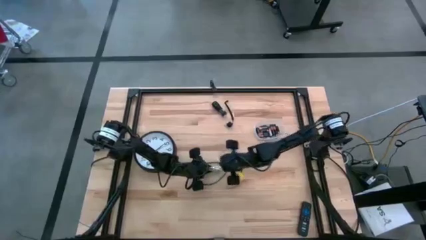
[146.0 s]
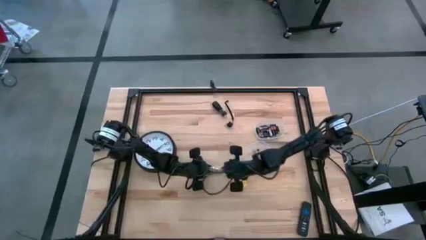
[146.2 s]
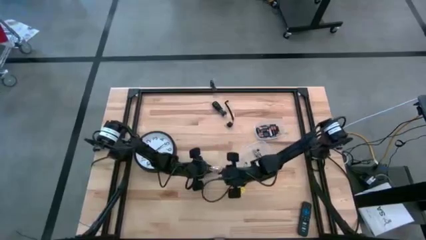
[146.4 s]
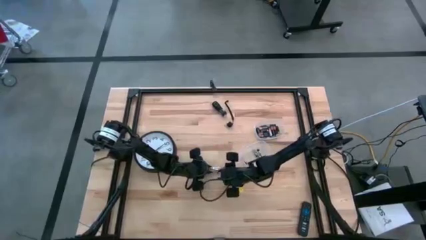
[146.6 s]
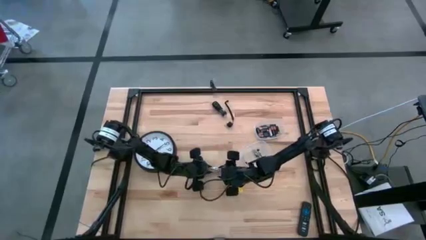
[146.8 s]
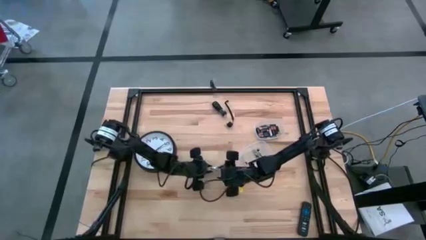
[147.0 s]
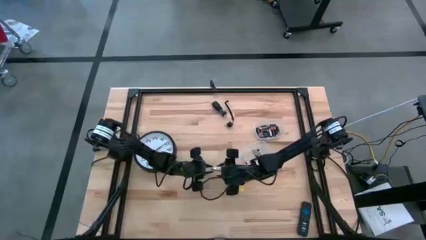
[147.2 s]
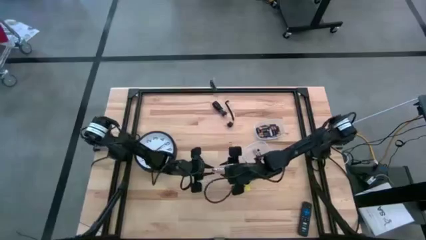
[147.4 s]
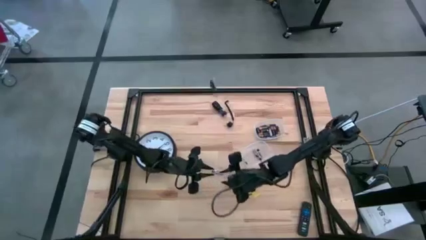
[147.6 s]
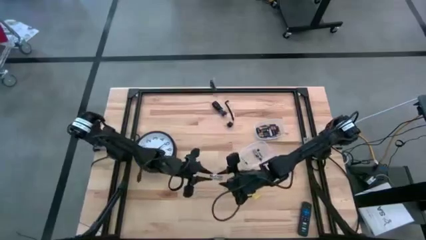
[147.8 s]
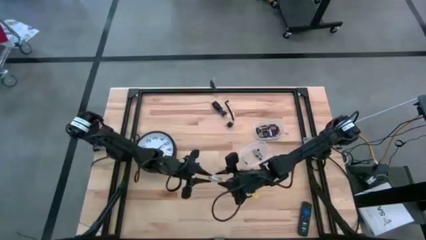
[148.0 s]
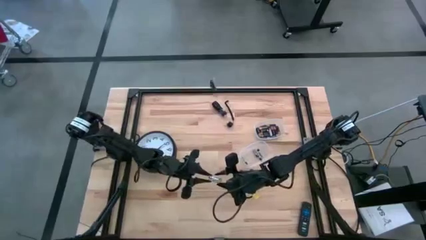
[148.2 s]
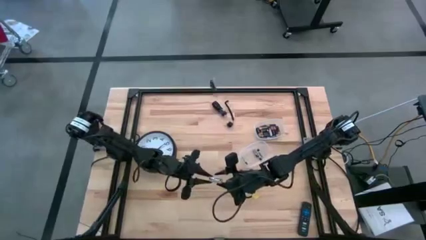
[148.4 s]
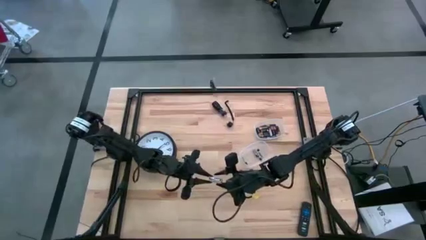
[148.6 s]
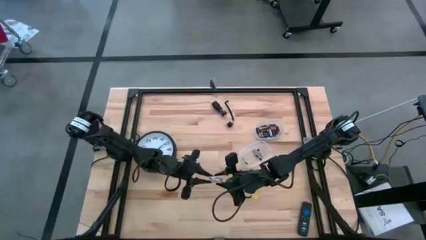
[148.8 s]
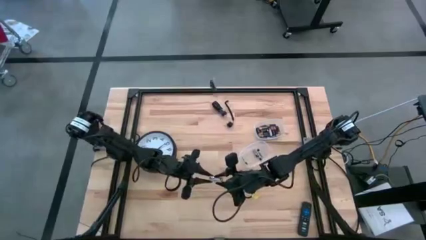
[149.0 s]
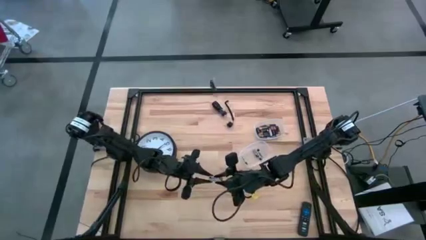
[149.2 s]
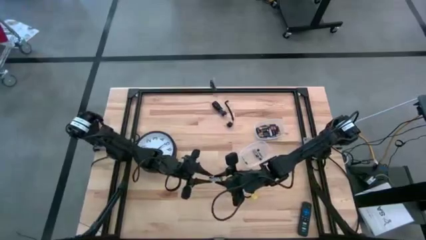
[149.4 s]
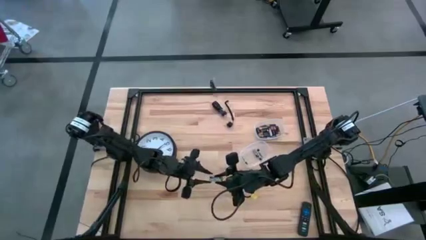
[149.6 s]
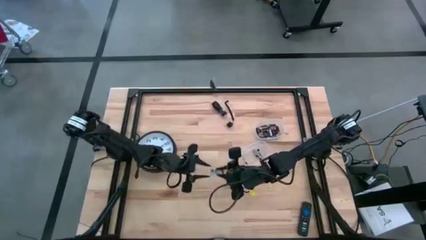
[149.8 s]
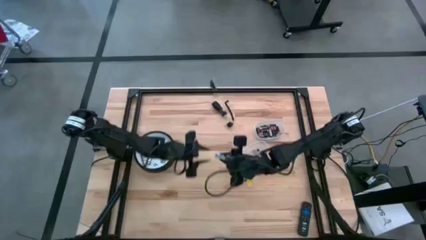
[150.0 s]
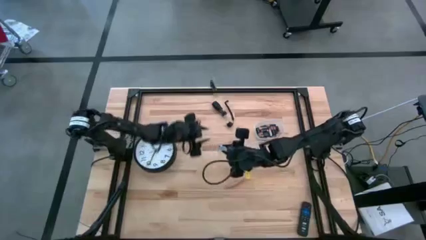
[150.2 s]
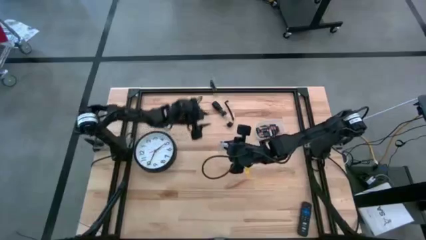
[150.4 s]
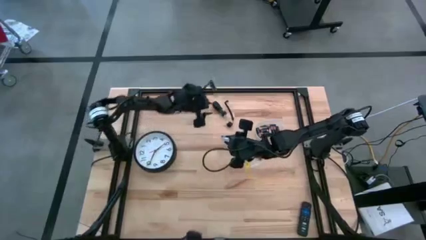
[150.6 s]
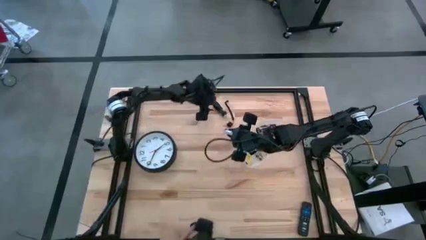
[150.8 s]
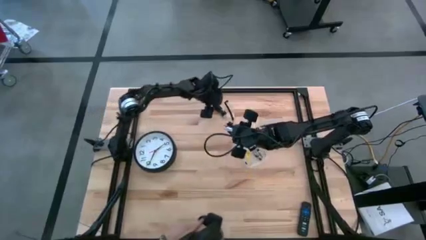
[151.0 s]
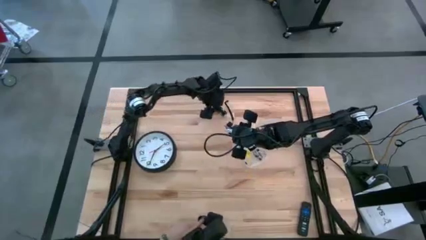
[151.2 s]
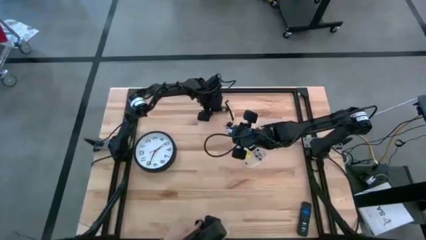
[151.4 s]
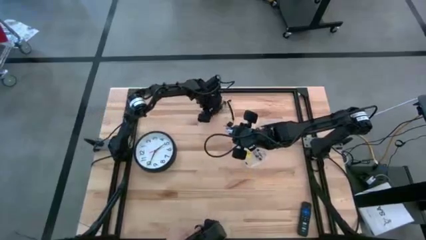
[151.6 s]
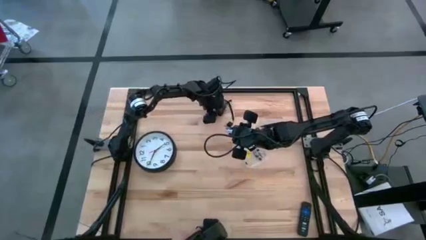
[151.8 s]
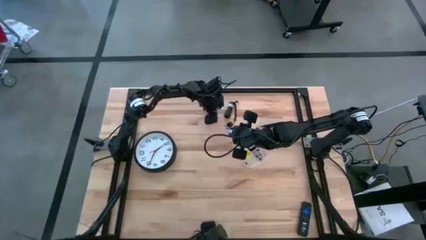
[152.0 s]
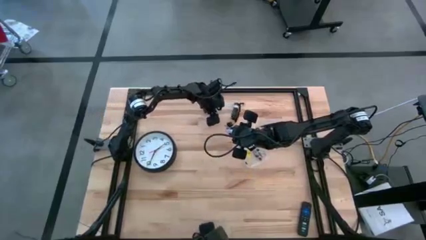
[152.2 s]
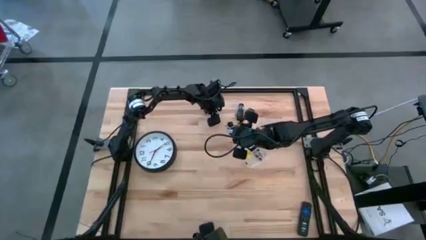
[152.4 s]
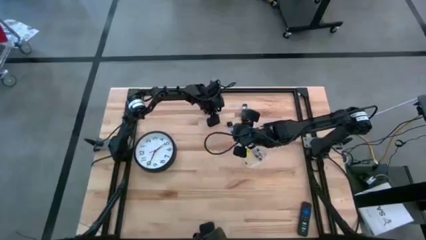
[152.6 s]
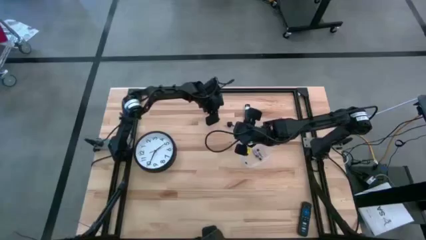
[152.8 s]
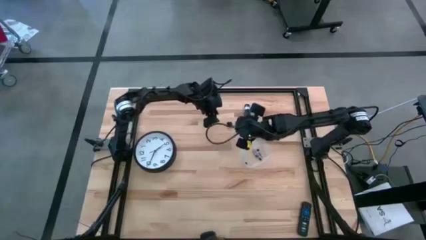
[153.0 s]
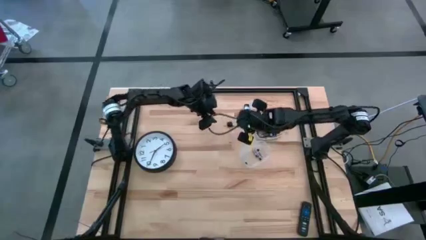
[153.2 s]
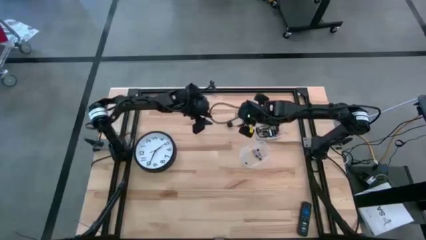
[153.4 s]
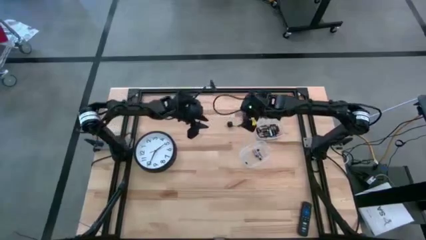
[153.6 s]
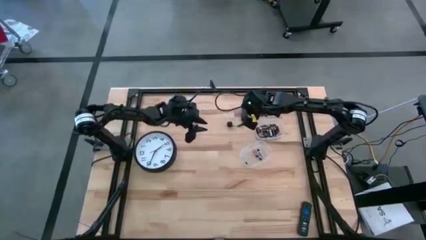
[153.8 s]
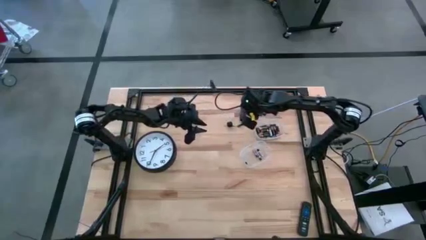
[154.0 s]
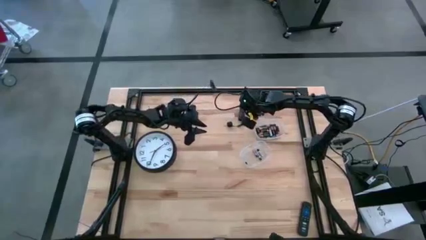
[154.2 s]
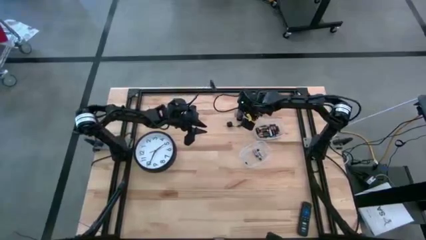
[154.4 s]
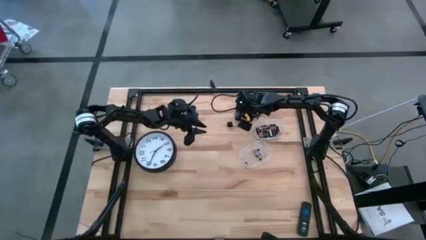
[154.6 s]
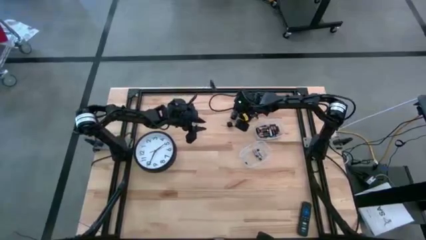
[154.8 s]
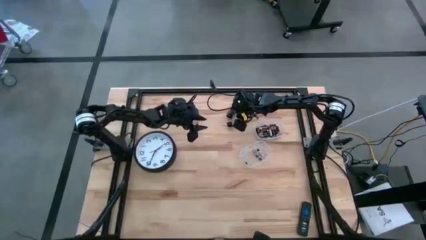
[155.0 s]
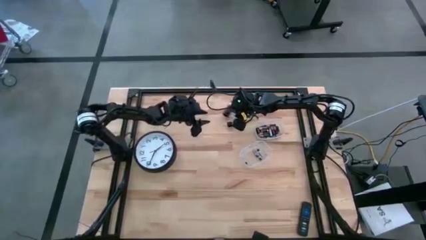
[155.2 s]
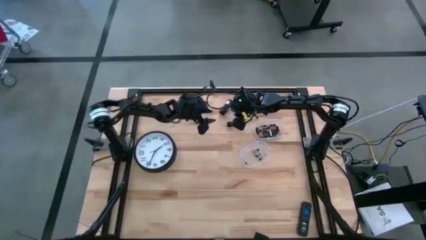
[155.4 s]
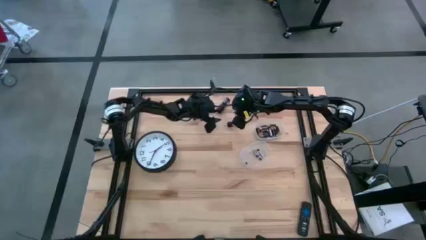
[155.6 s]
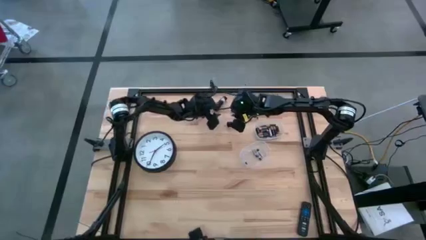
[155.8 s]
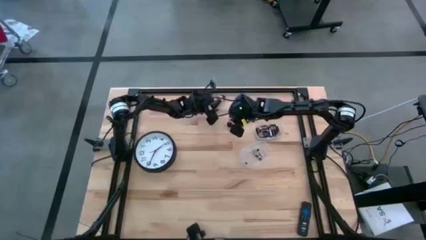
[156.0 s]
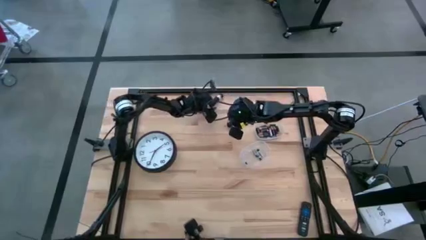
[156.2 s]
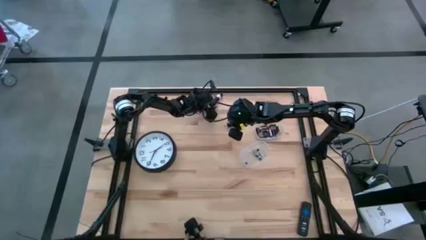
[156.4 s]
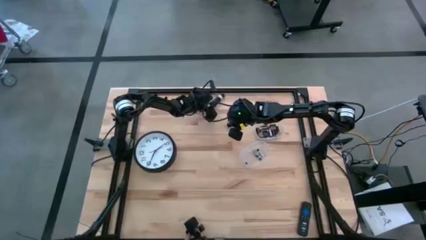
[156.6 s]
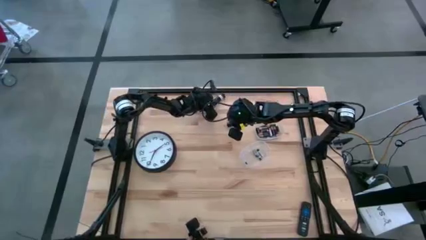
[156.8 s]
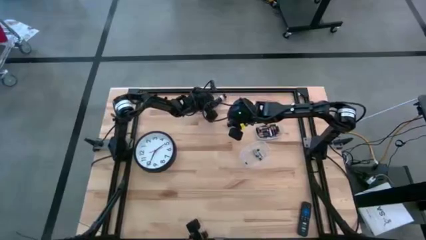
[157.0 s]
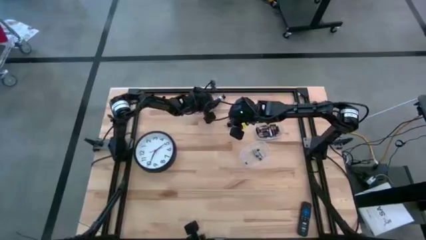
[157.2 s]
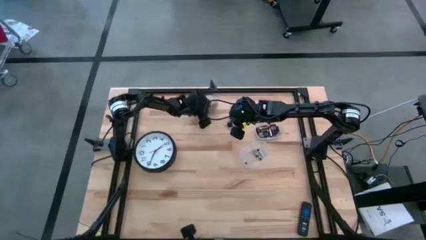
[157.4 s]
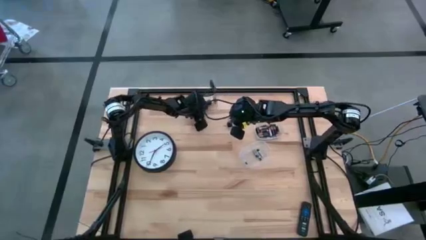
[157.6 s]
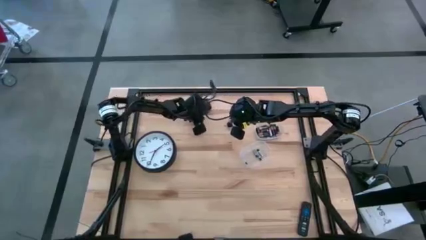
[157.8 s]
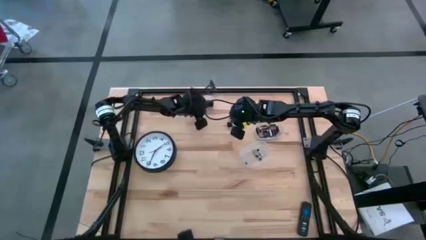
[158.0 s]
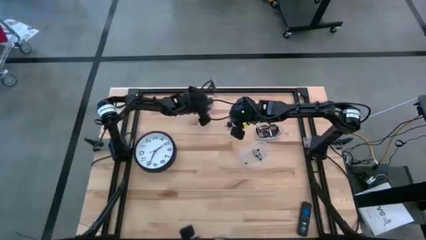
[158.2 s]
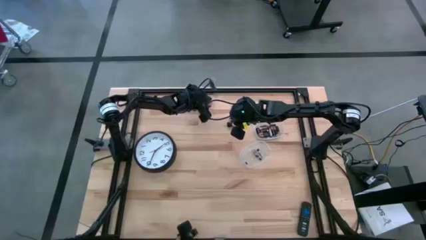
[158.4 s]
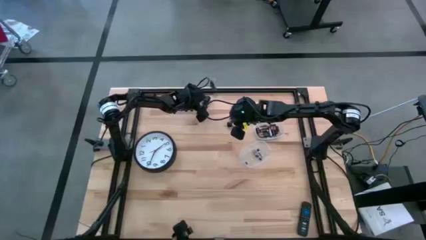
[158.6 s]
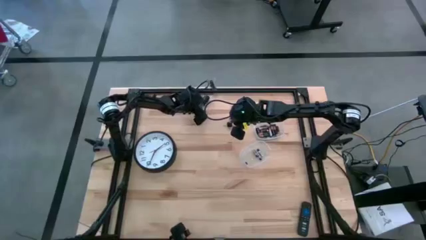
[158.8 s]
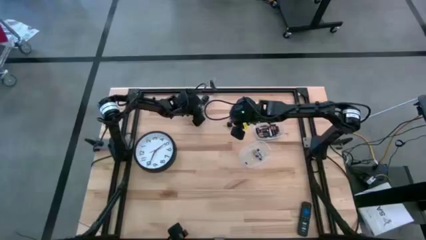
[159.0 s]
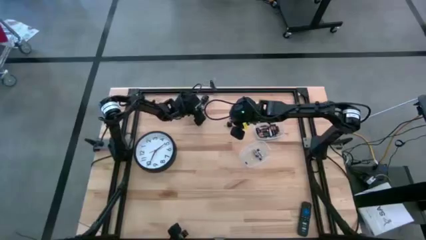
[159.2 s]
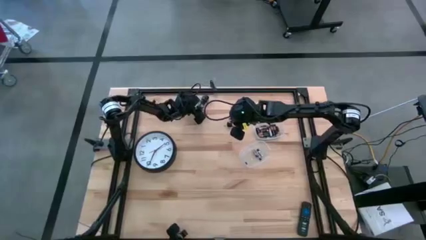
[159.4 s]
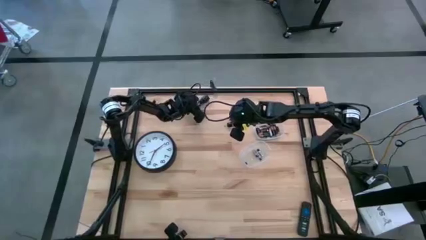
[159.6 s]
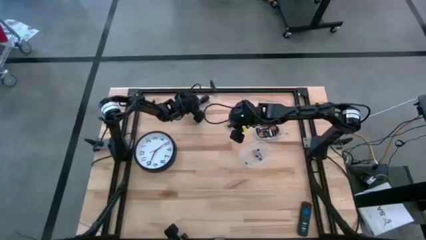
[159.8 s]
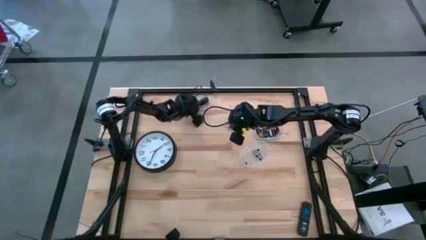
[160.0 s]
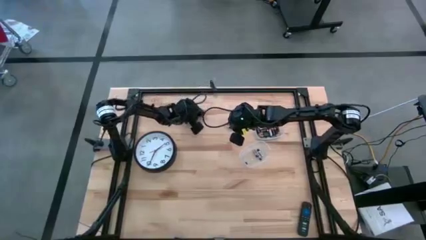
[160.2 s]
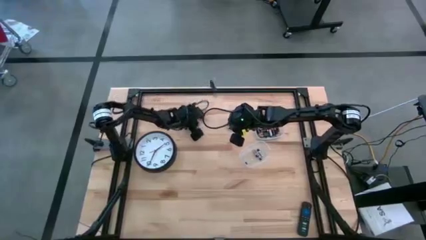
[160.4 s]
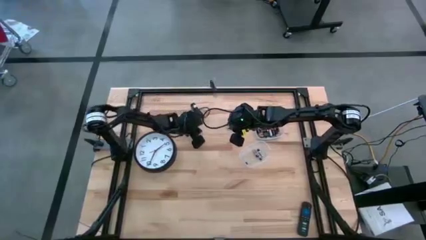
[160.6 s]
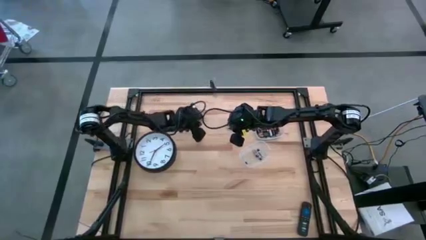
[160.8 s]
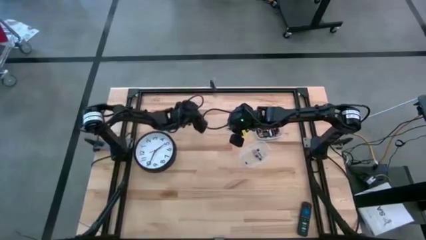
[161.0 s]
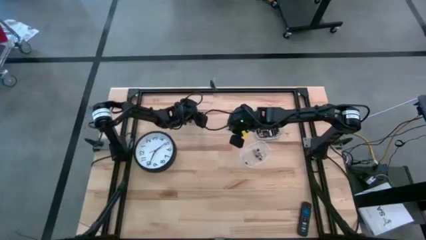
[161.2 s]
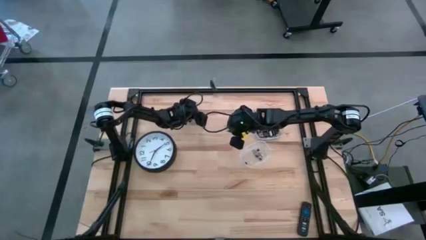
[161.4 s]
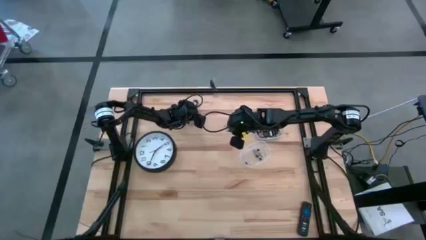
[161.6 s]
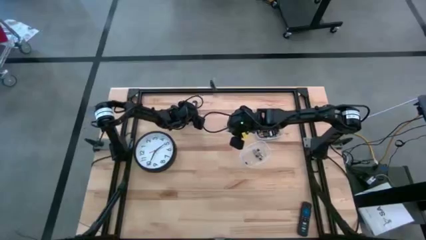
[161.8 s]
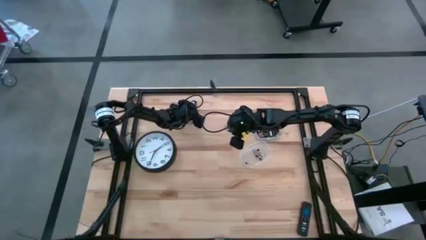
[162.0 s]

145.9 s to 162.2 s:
Task: Insert battery
Insert the white battery holder into the white flashlight compartment

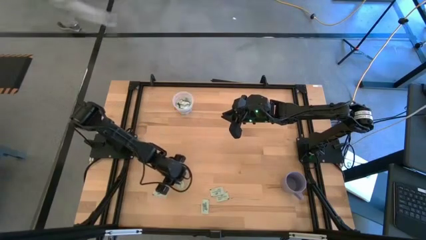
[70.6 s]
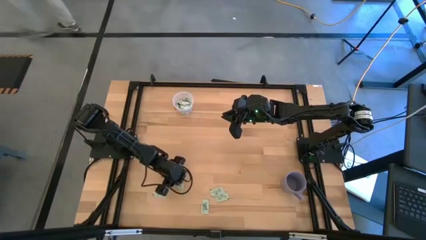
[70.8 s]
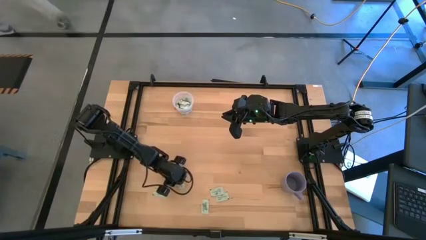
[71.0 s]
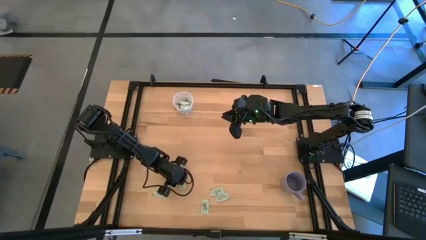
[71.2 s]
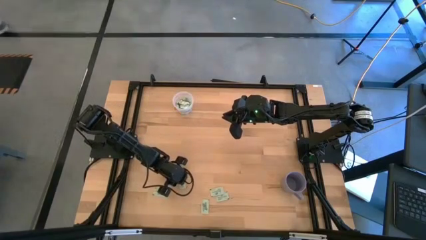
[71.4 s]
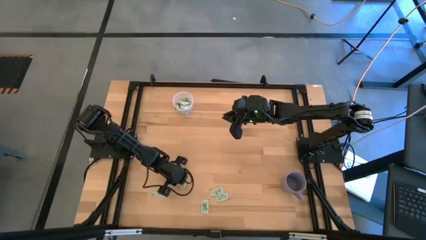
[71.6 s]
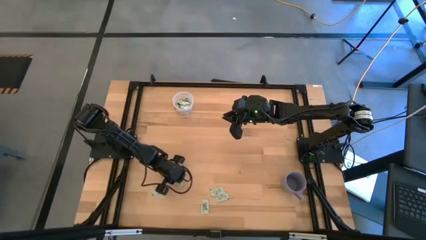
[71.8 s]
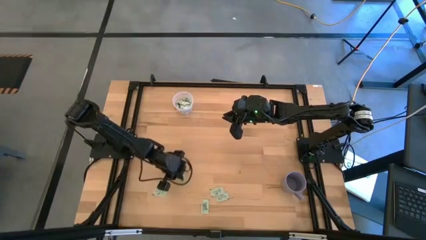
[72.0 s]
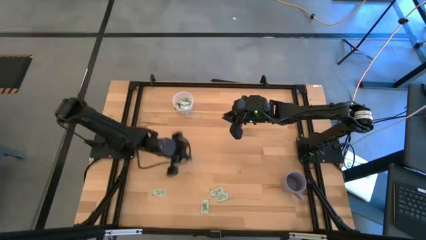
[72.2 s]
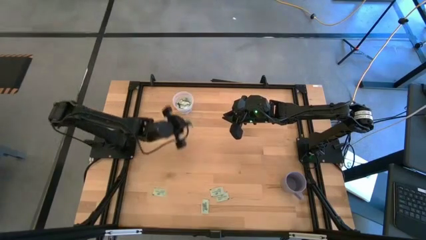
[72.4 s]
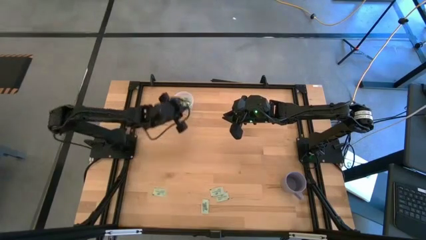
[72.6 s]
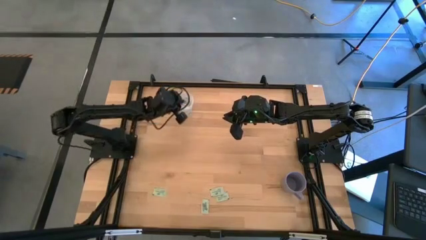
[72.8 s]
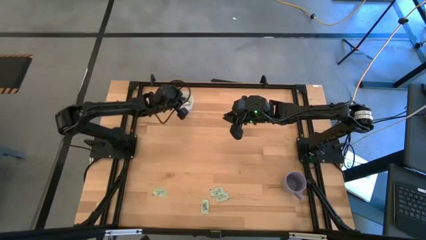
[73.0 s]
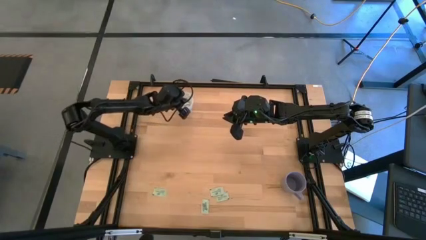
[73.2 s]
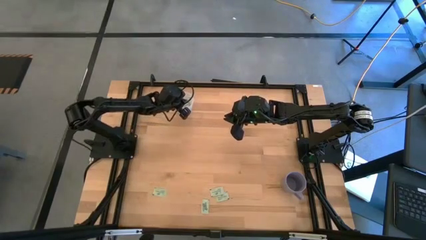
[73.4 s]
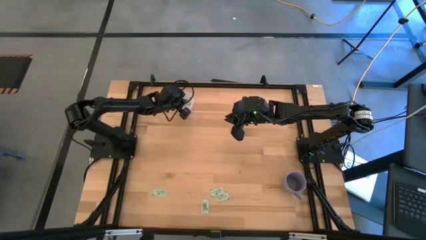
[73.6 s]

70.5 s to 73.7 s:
Task: Pick and place items into bin
Put the stevia packet into the transparent bin
